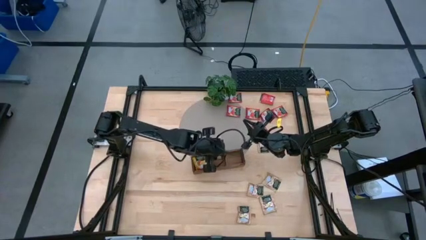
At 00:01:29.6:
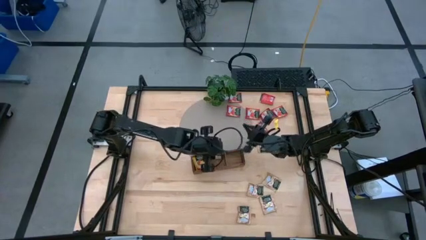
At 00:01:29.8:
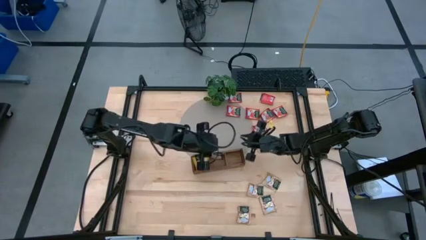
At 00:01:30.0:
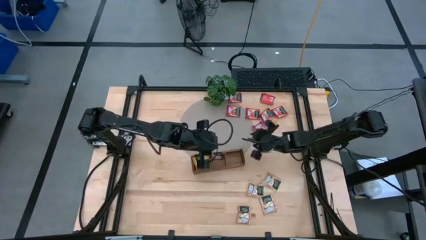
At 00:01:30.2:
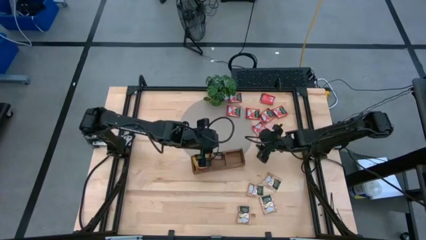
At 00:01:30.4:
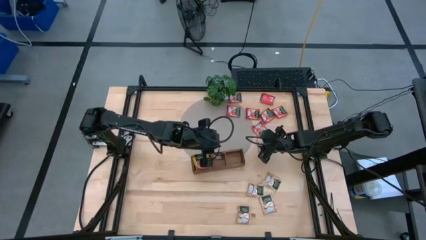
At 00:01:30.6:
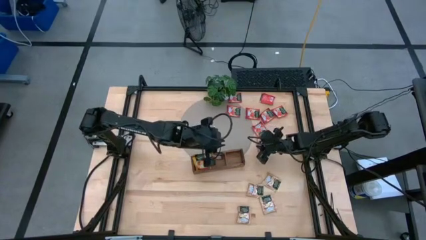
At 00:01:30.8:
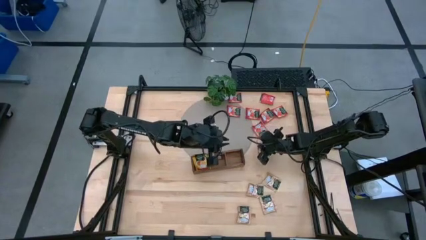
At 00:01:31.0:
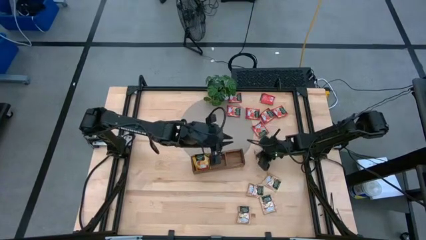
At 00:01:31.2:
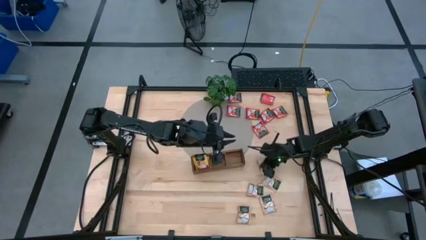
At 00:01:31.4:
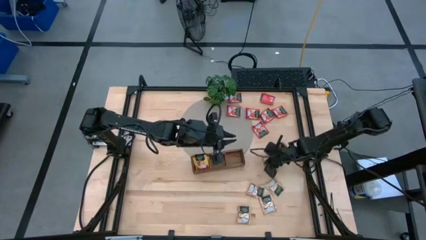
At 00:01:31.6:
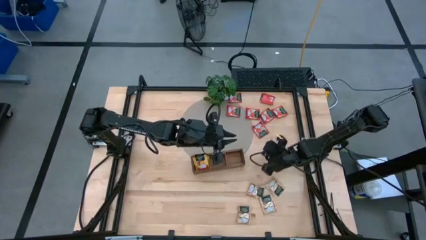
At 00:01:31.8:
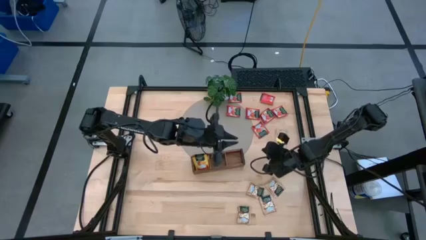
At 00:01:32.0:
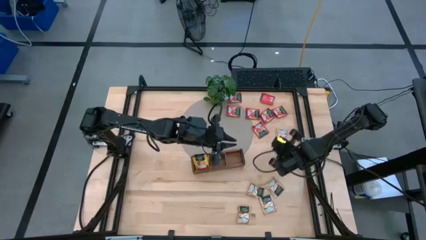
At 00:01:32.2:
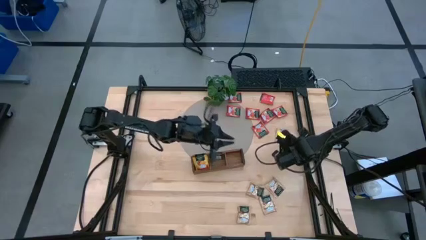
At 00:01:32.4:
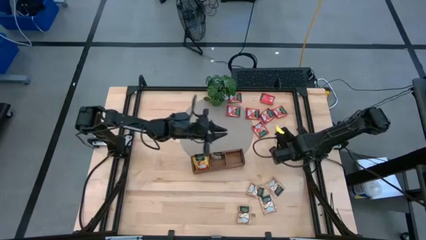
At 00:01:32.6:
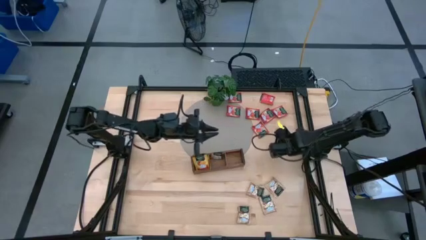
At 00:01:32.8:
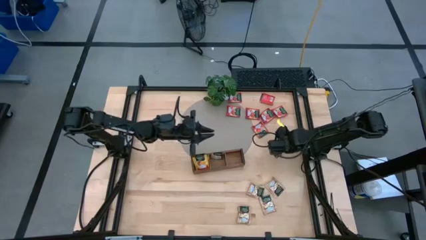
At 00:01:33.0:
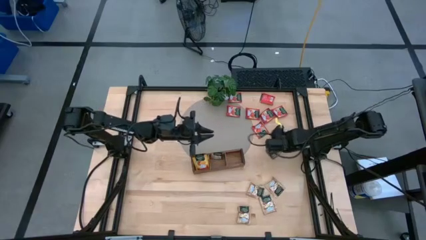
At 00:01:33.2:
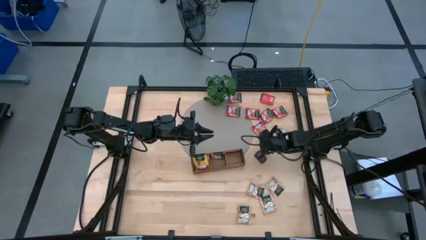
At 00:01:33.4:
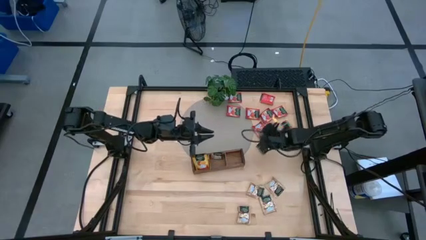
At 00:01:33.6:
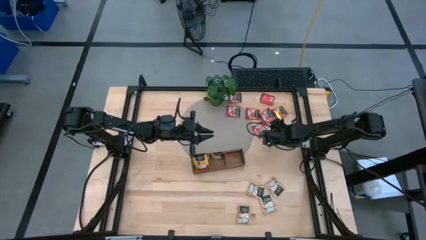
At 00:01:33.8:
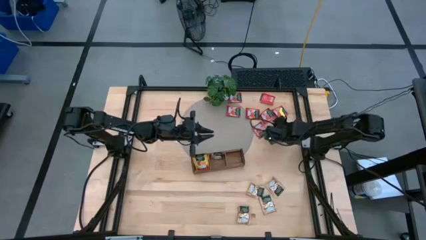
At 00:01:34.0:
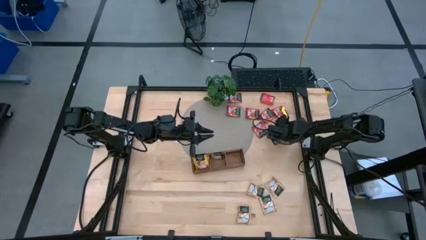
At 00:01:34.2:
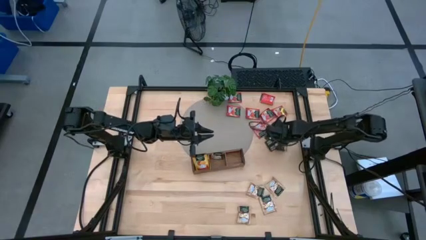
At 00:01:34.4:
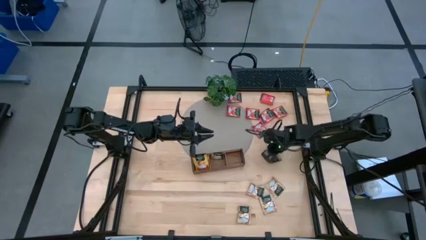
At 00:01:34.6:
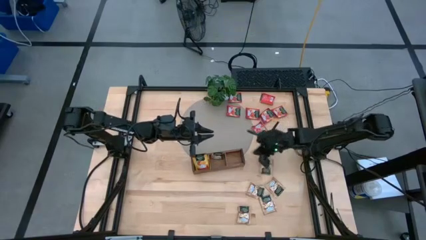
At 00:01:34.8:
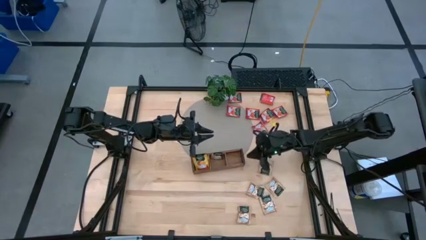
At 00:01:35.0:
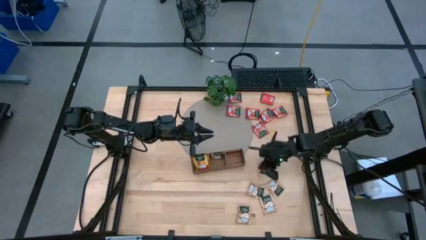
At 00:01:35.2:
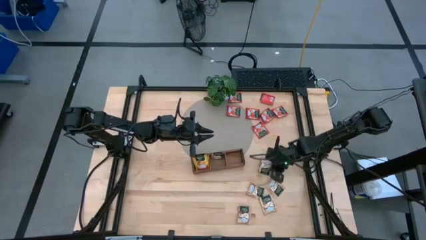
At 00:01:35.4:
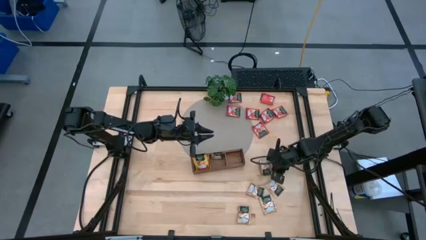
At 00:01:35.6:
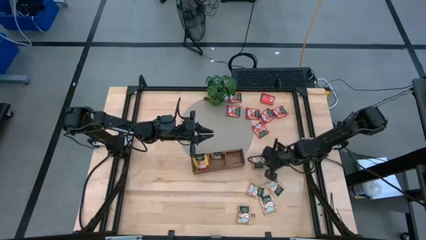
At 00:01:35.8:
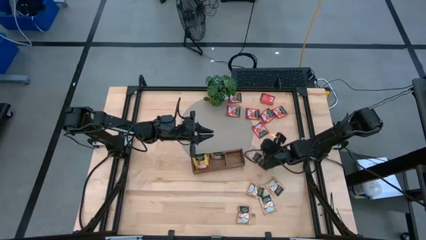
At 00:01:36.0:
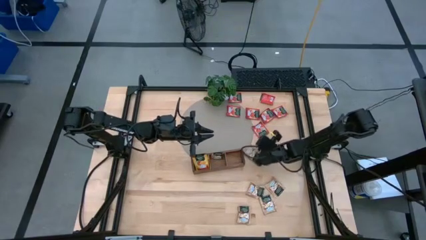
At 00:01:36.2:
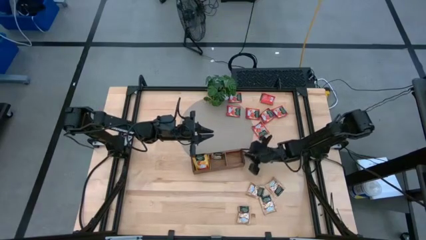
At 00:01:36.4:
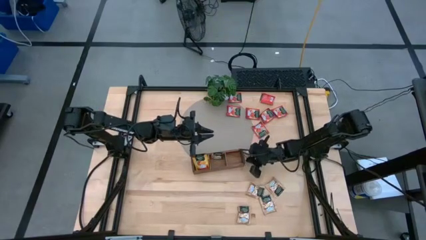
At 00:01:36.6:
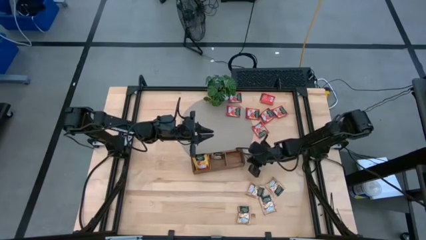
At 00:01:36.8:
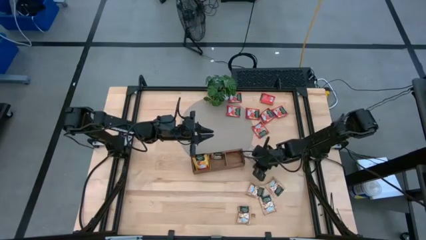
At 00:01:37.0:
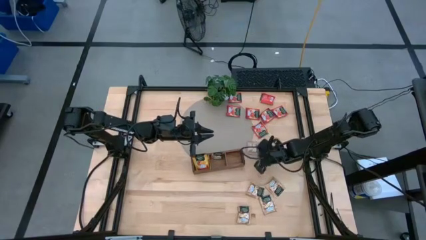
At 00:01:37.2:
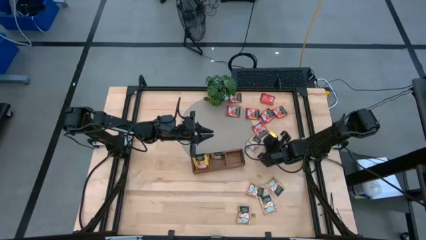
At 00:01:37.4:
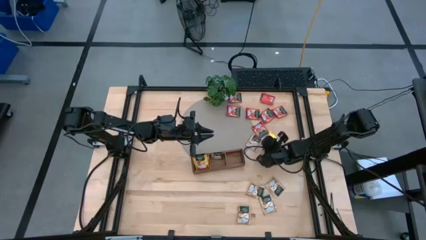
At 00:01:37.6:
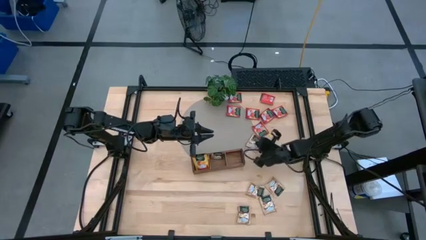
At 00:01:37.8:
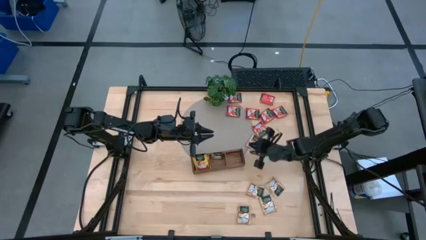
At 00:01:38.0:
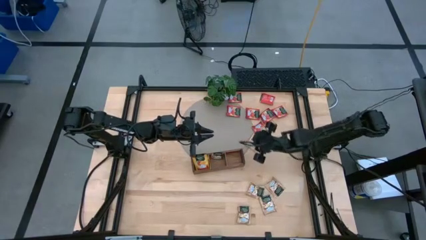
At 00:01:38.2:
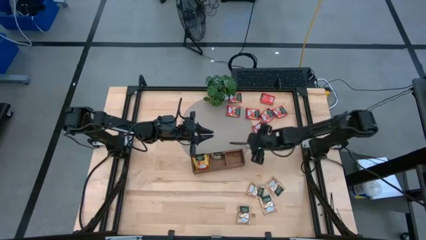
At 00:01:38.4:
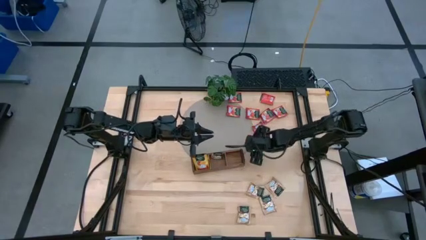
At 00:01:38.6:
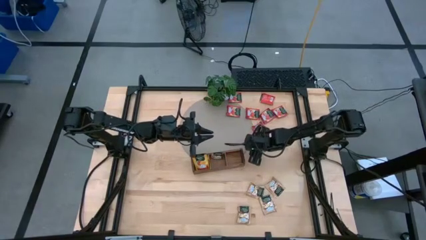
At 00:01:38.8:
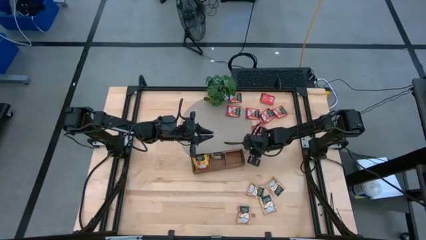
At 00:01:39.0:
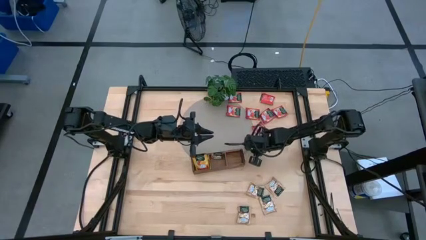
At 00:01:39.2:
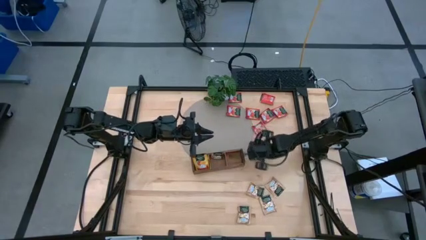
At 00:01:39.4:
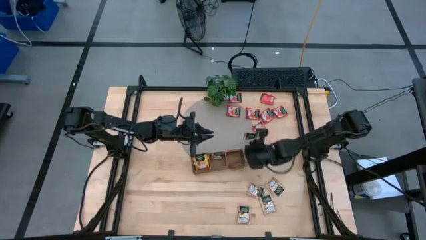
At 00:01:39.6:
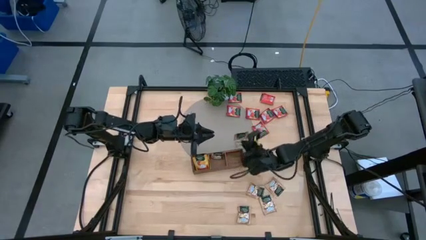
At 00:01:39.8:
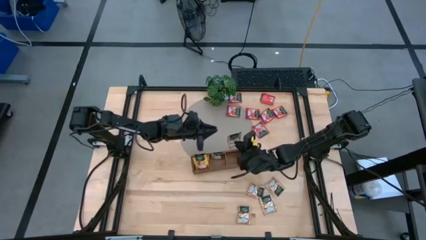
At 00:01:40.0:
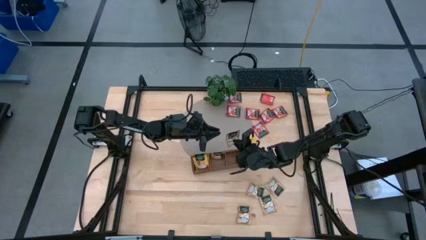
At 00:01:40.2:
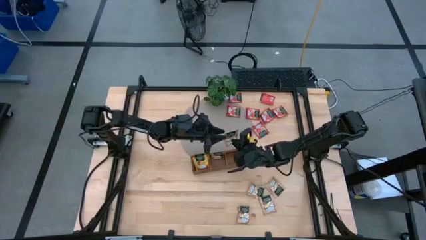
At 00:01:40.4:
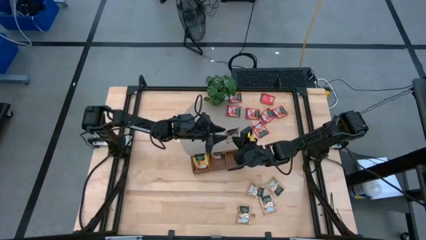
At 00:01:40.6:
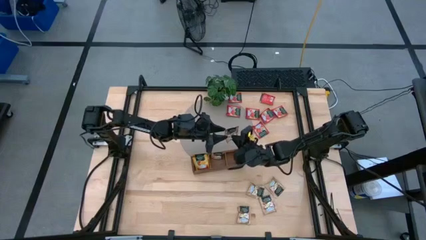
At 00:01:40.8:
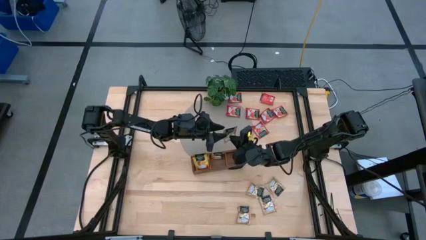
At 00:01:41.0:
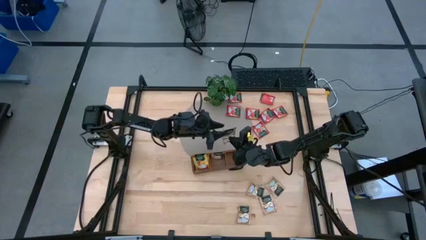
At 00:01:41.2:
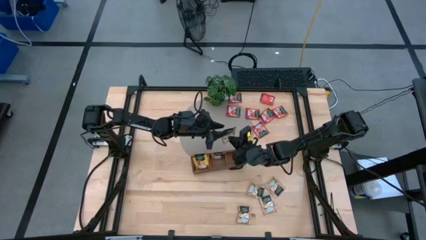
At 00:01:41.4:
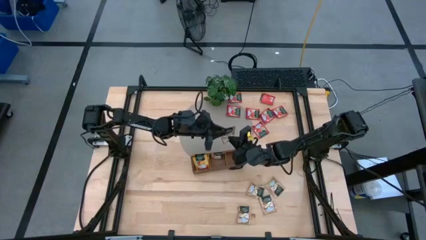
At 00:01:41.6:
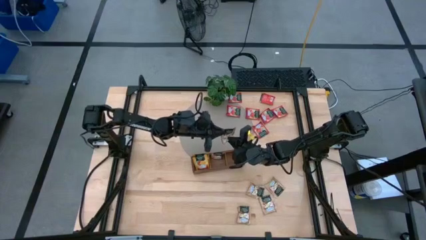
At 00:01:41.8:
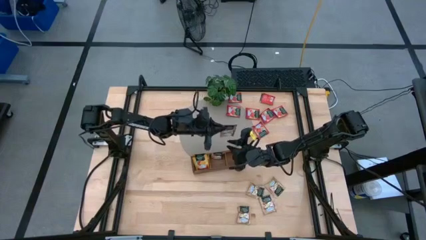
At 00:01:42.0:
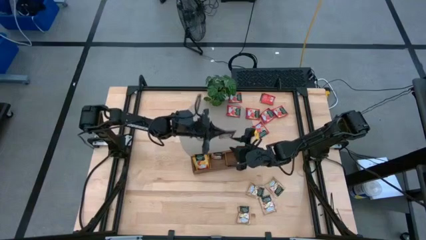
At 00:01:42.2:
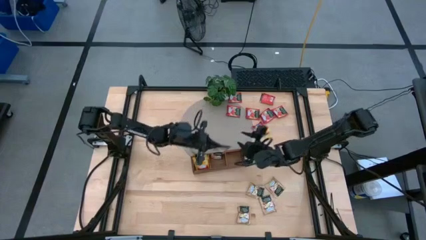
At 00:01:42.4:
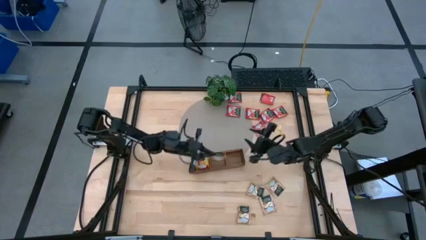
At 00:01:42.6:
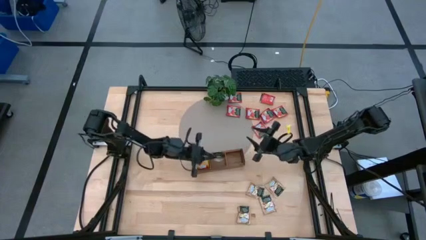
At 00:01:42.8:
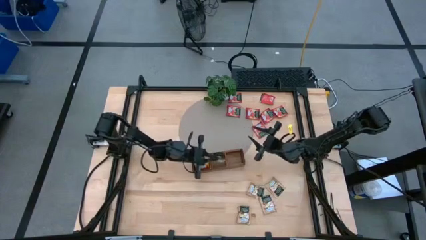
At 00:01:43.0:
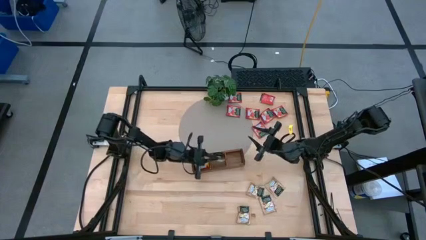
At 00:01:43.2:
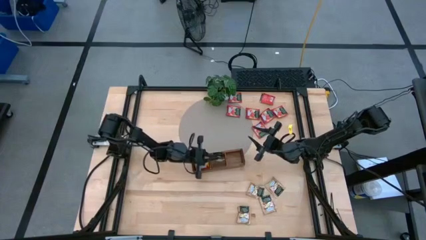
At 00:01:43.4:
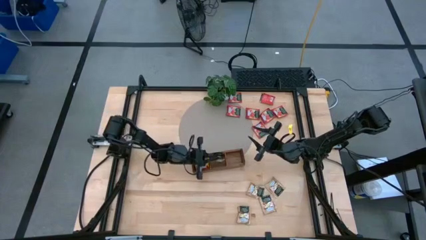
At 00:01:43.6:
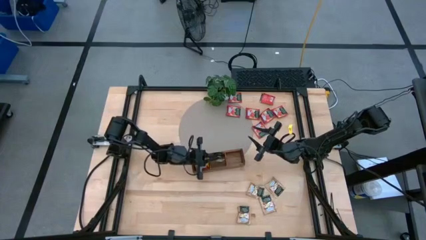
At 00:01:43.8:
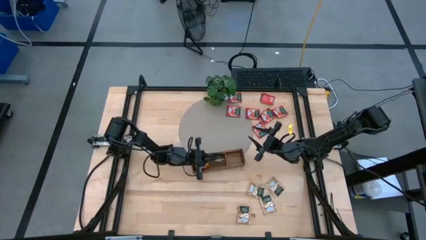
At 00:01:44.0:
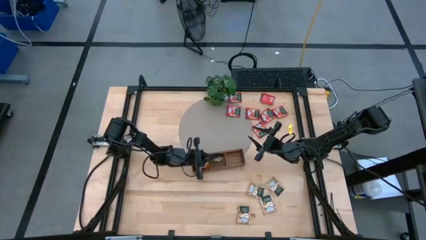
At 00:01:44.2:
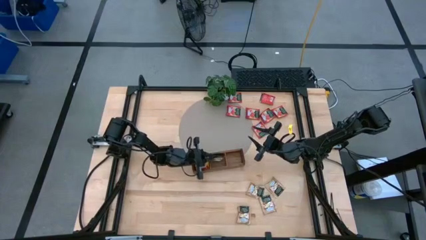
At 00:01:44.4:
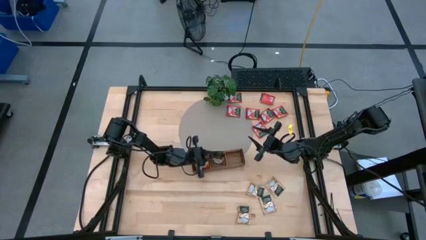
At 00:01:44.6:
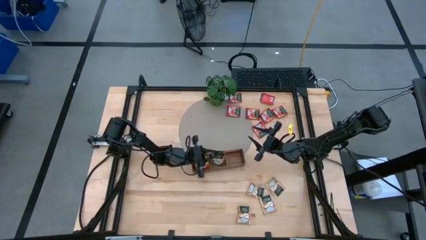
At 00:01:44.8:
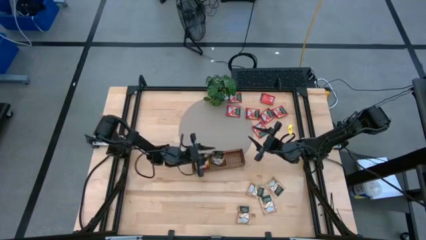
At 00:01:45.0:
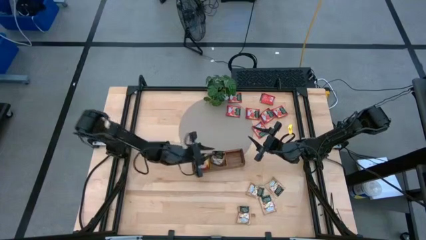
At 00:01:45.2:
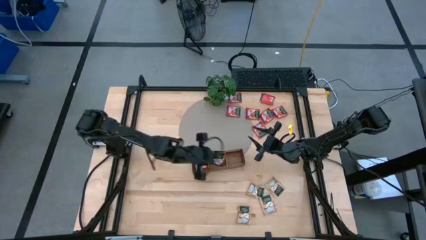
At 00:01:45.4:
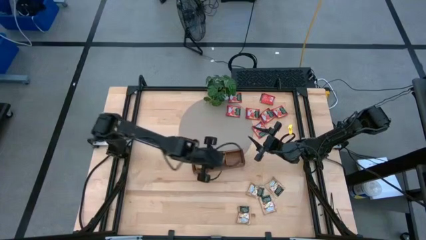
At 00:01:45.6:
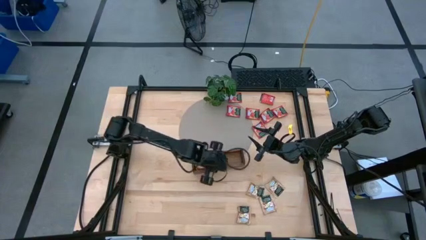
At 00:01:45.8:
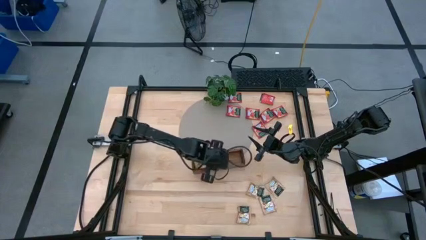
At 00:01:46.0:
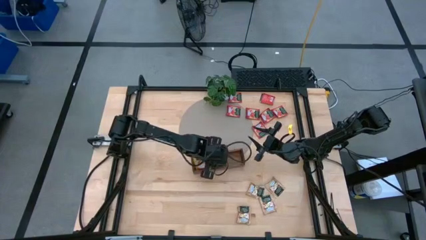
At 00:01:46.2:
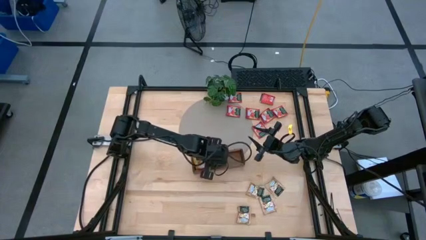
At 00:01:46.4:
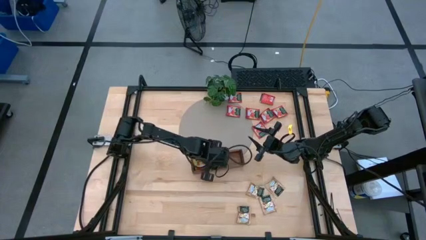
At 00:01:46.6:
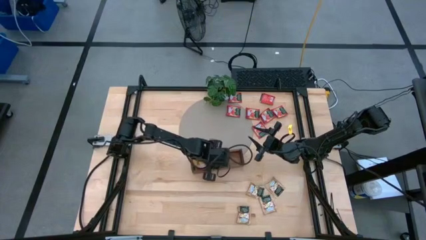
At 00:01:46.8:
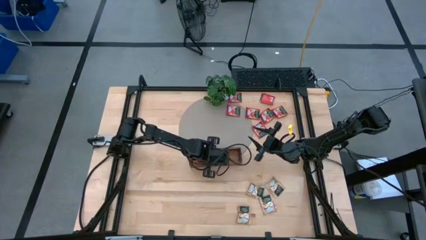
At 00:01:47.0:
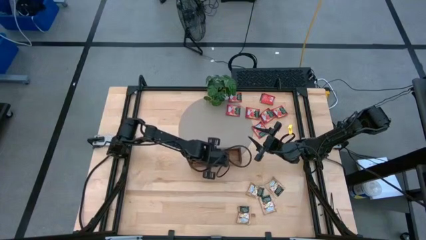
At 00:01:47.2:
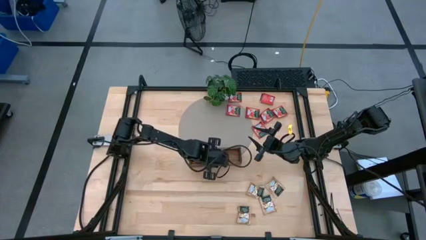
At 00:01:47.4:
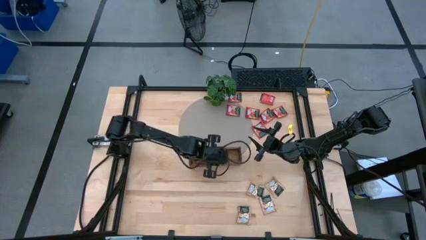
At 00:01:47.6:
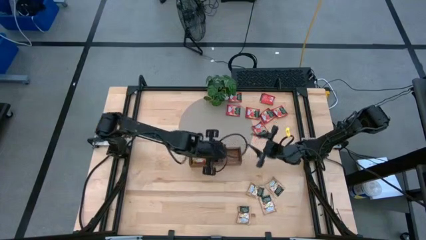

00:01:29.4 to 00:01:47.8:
Task: Pick & Place Tea
Put the brown tea bag into the middle slot of the wooden organizer
